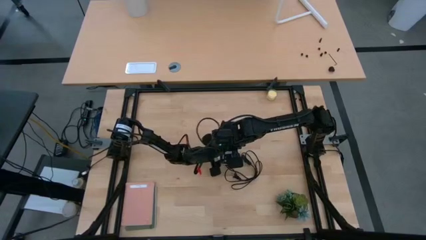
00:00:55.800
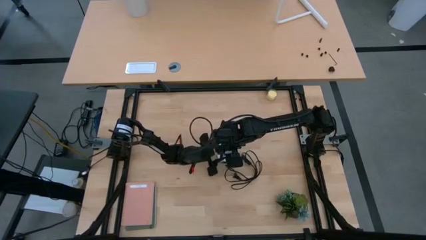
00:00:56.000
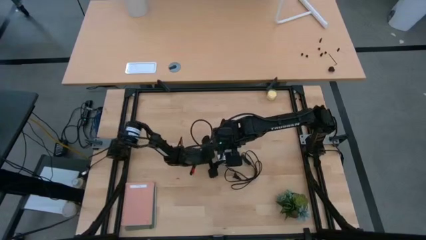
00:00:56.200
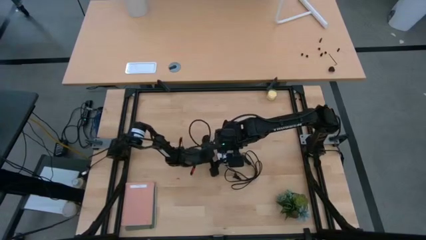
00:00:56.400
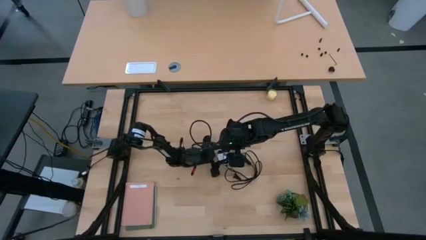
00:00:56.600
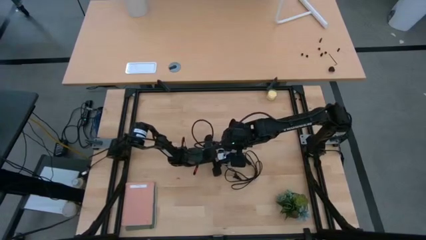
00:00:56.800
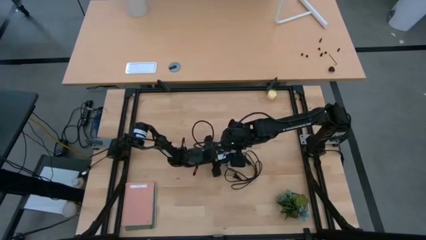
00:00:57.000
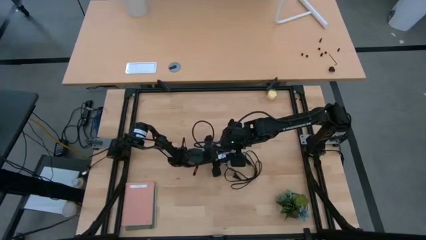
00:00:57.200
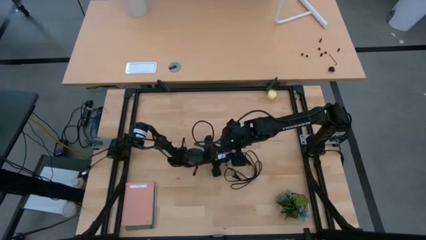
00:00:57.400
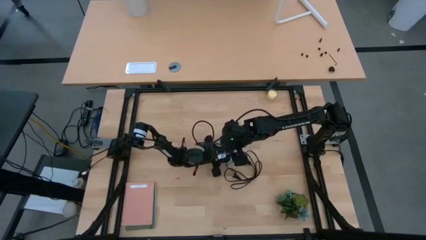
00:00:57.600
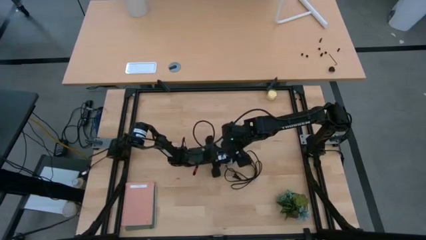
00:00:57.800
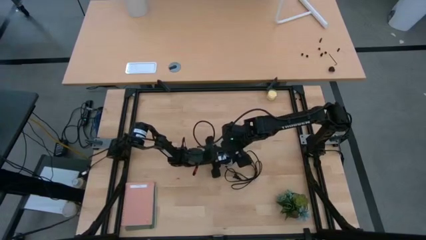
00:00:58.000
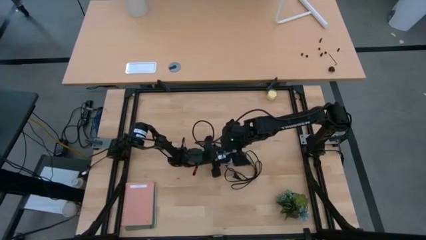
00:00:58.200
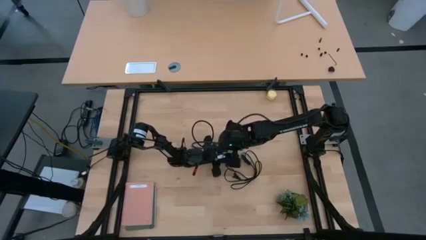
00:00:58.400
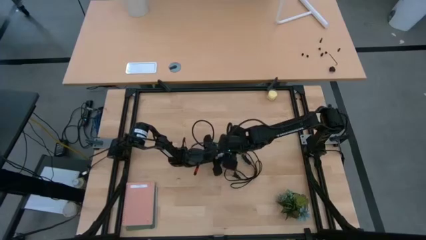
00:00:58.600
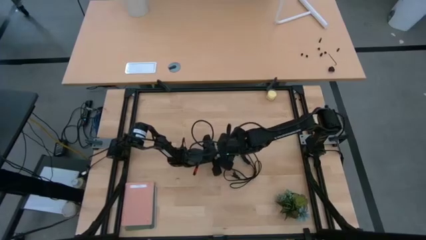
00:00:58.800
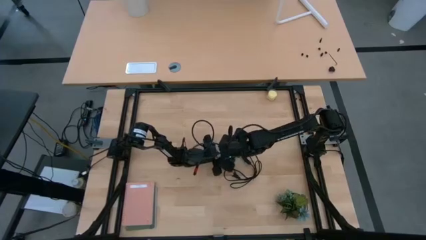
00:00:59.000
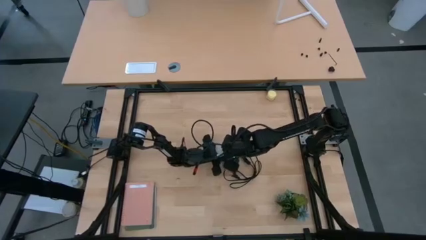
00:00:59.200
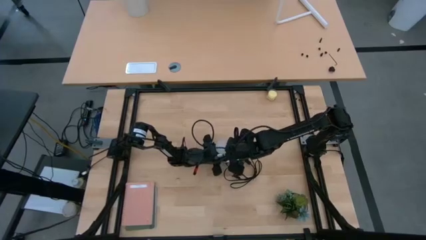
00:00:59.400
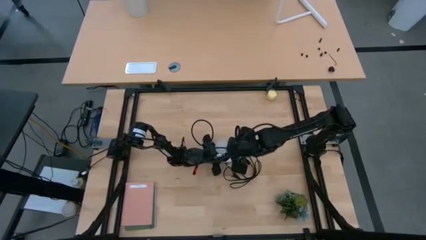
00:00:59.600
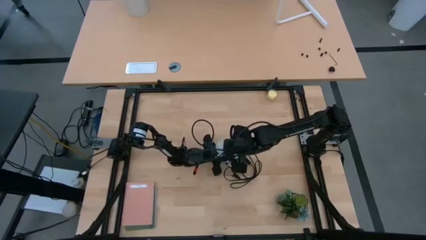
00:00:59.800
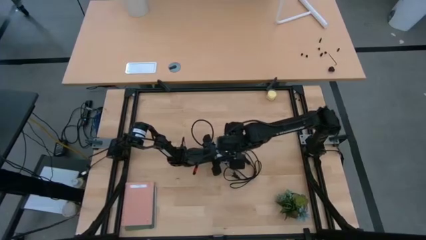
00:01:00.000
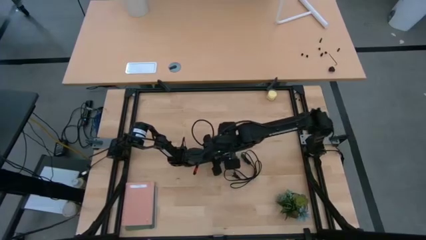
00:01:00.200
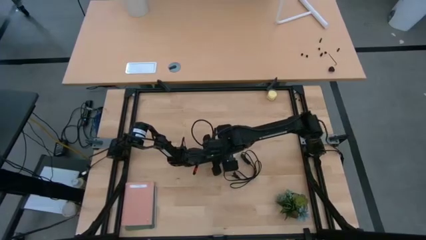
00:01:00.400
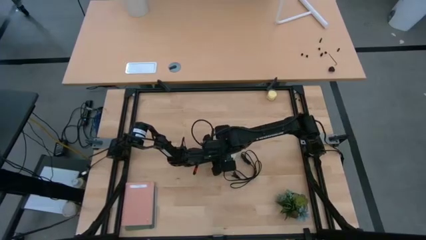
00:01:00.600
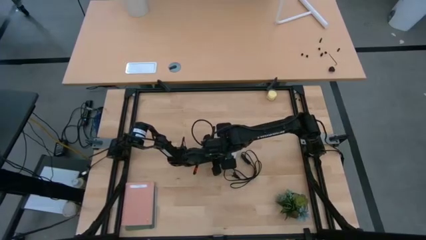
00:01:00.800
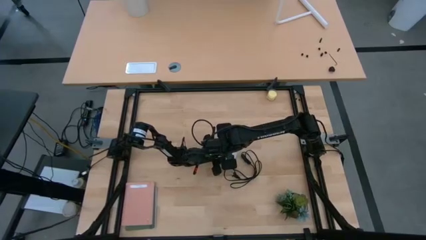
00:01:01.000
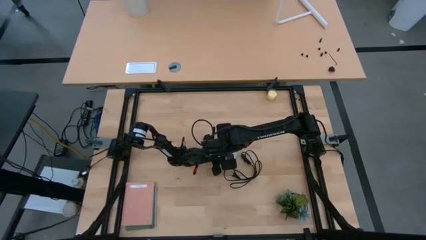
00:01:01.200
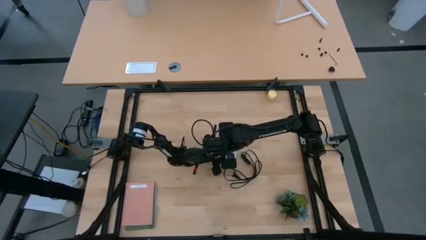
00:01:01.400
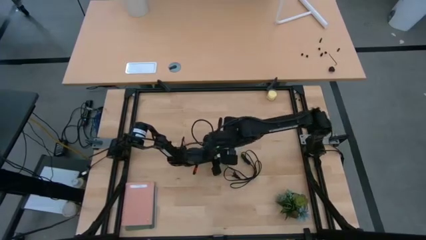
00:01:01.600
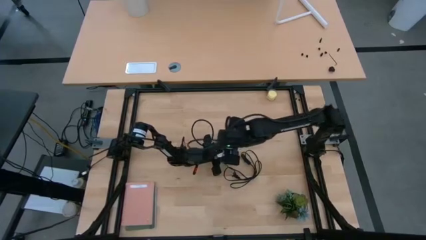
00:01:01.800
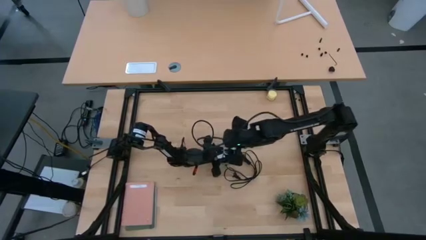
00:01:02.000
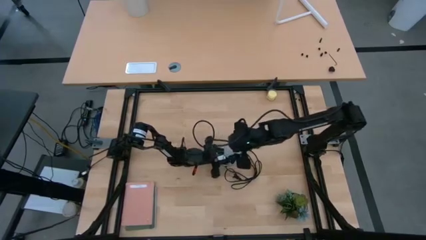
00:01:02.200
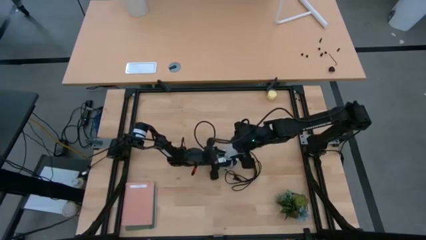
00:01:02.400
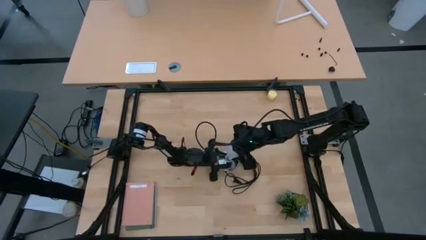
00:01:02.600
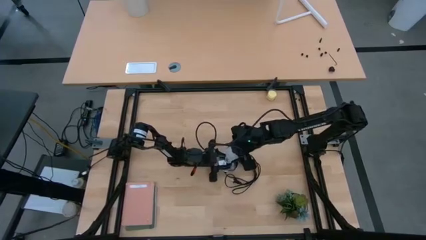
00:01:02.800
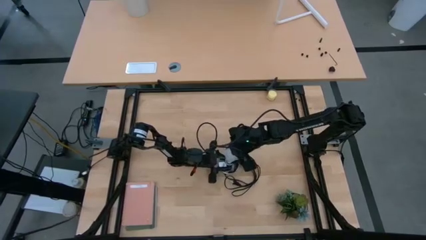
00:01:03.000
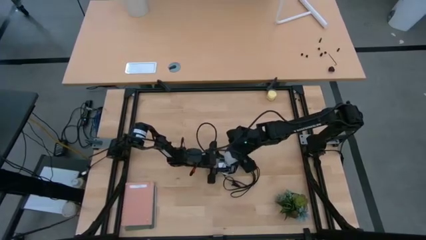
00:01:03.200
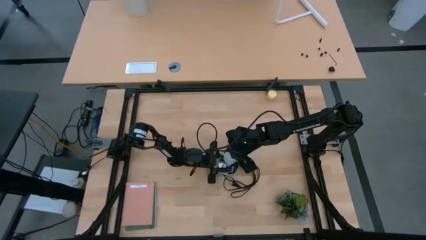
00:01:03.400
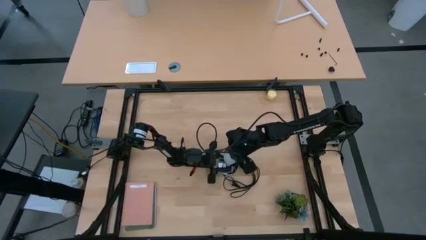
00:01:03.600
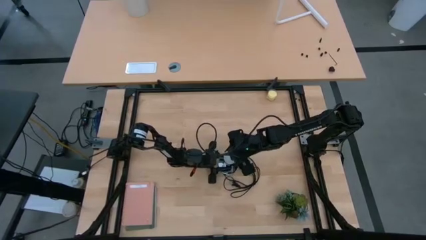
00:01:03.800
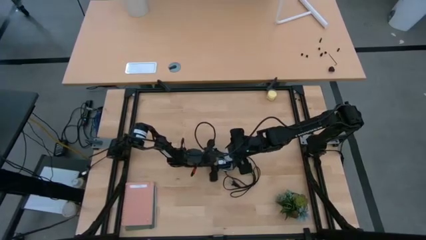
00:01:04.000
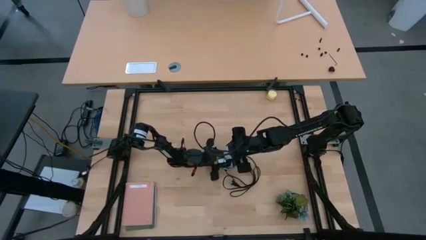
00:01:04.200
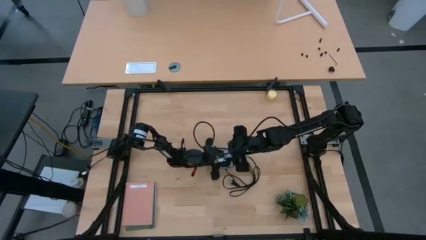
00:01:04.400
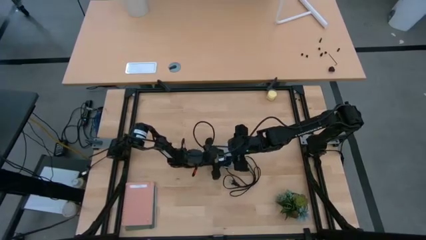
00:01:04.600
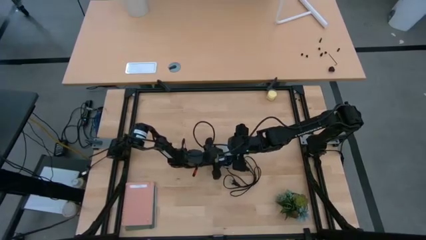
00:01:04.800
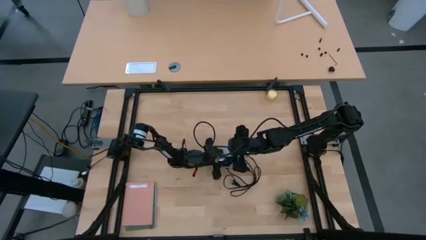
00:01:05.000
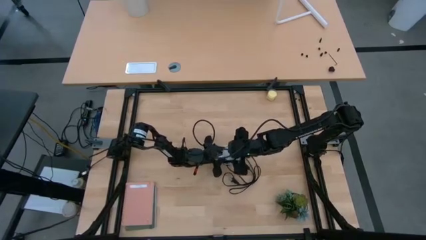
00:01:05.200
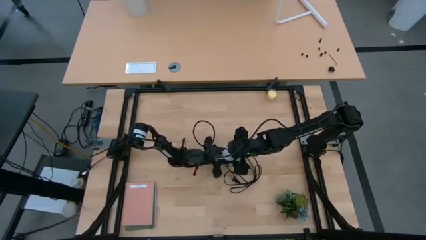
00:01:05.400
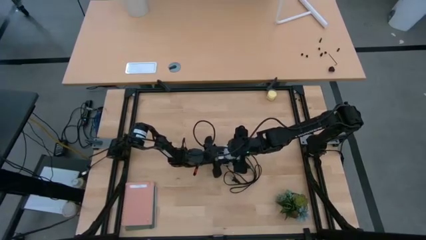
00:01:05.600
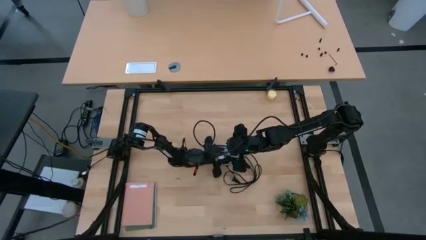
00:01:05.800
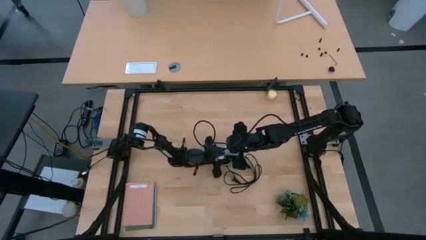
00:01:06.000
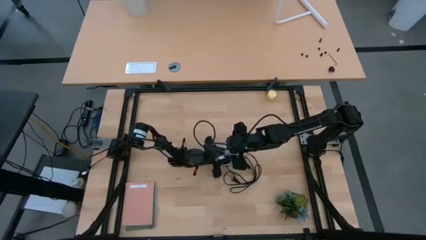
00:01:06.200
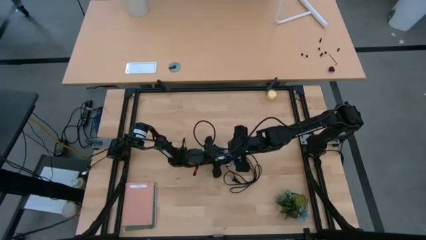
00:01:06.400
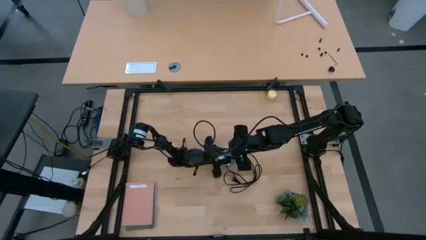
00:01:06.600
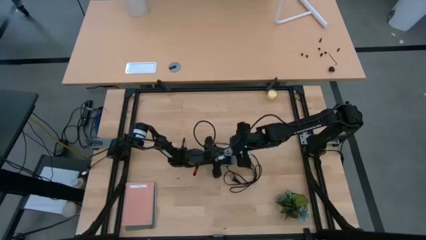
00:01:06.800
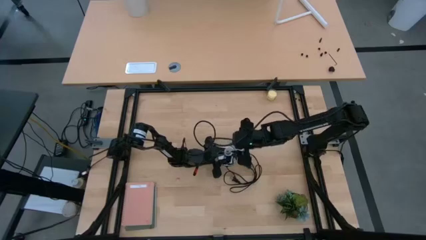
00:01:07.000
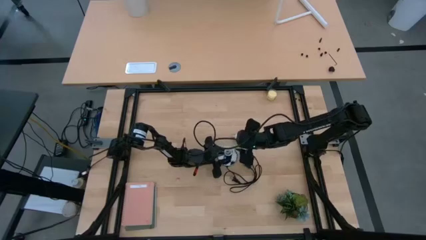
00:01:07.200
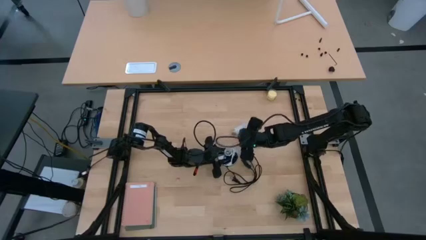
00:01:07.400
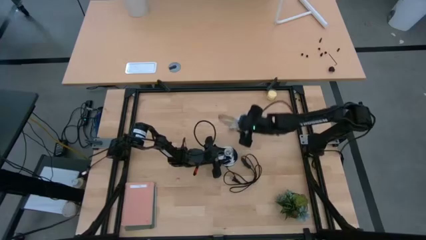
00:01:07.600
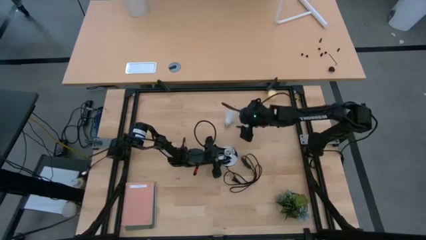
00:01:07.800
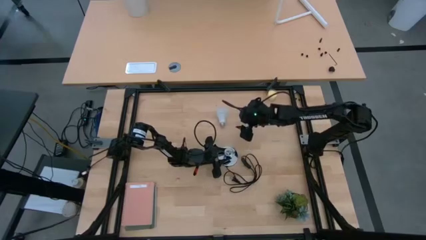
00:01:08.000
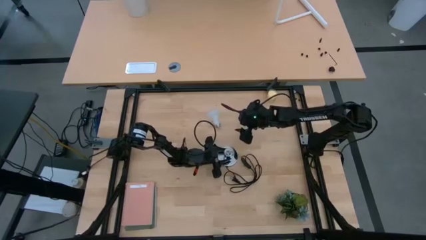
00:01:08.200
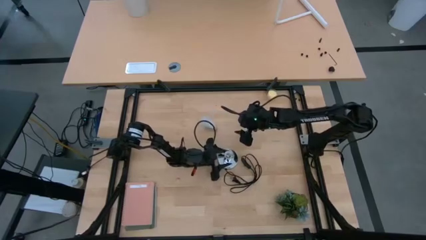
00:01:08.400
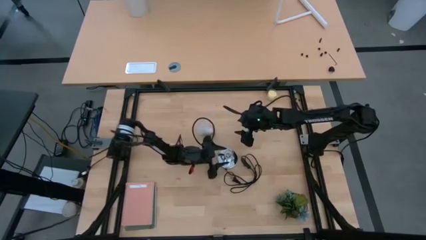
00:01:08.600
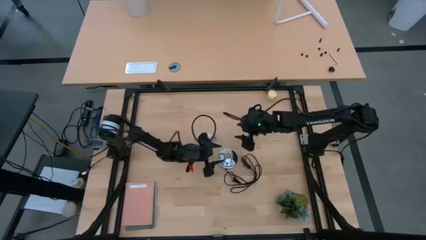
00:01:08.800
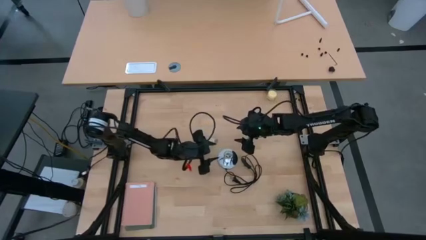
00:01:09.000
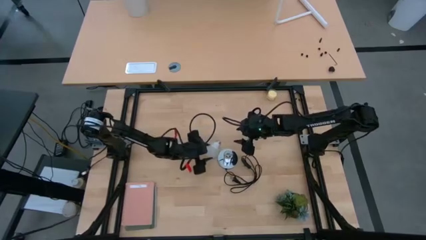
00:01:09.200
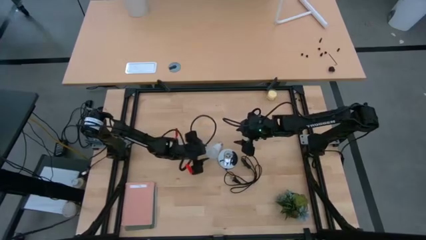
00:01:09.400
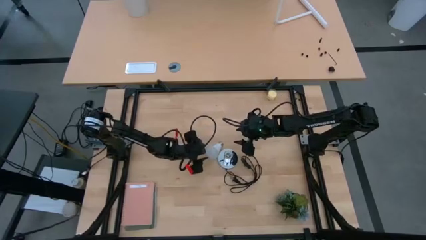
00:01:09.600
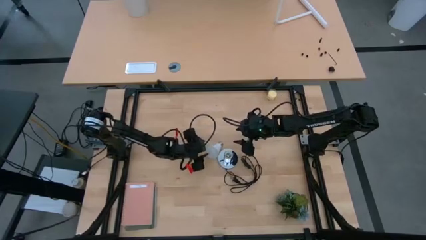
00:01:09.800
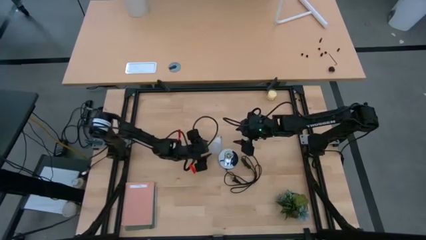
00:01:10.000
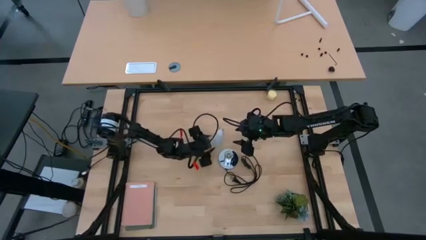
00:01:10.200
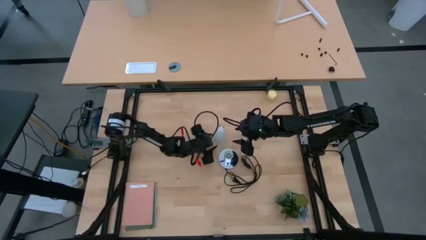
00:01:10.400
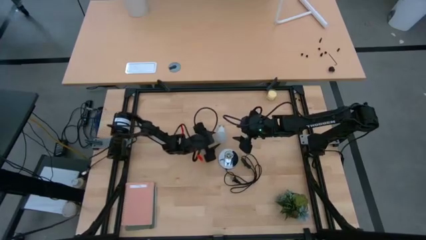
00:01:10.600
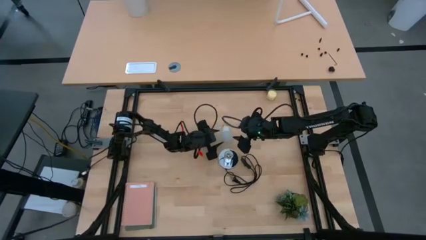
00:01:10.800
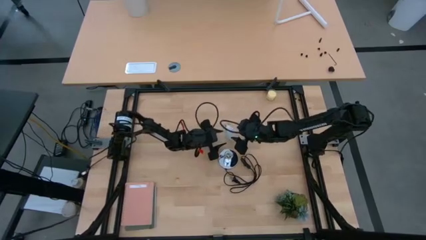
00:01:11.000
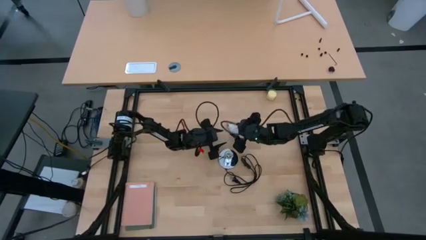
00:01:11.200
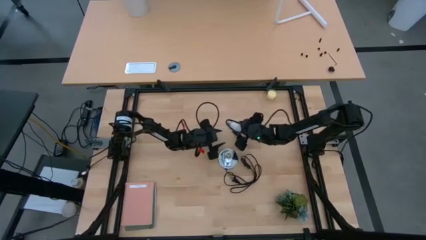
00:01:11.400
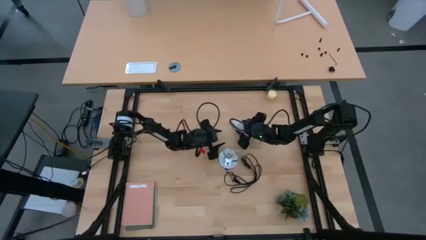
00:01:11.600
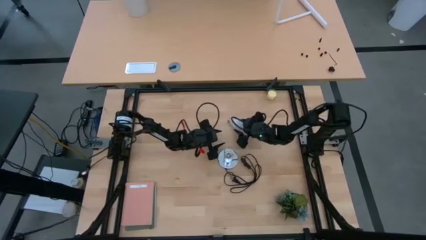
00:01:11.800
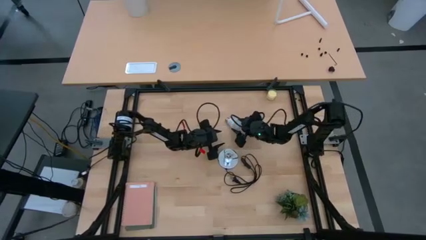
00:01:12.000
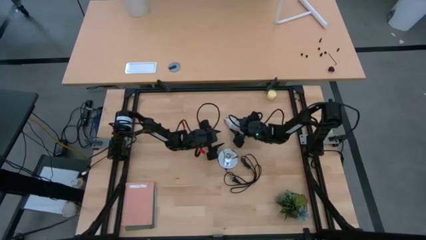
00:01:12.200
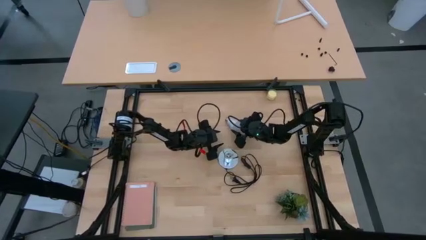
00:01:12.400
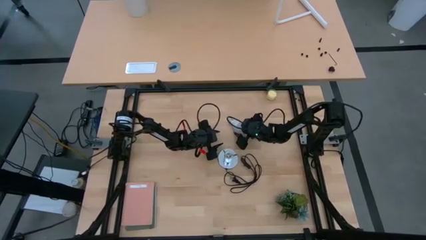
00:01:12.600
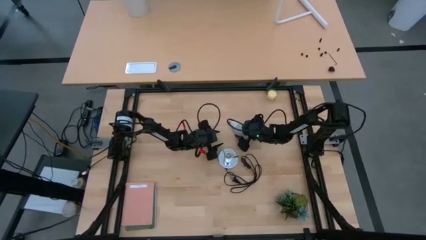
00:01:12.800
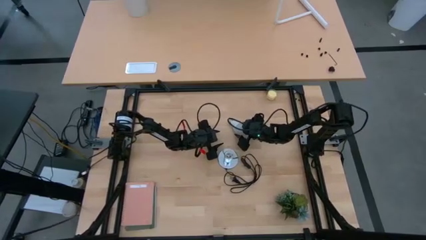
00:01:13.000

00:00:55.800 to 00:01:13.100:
Task: Screw lightbulb
Insert the white lightbulb into the silver lamp
